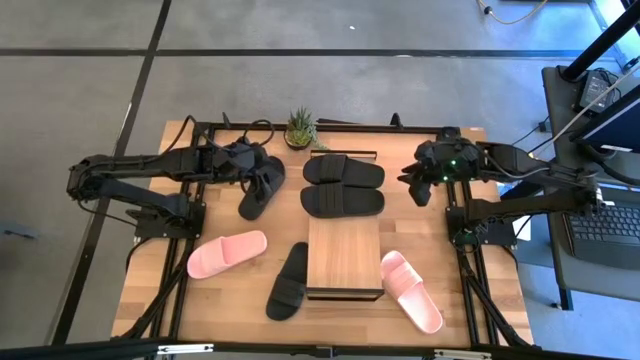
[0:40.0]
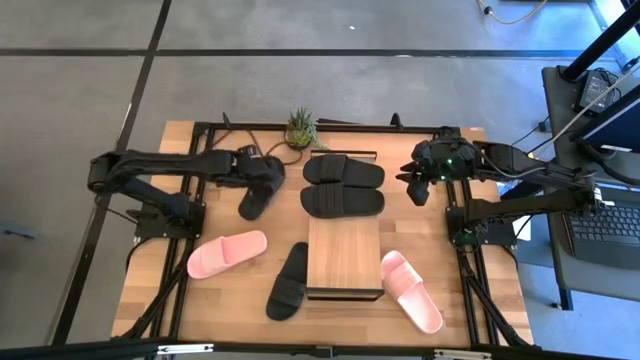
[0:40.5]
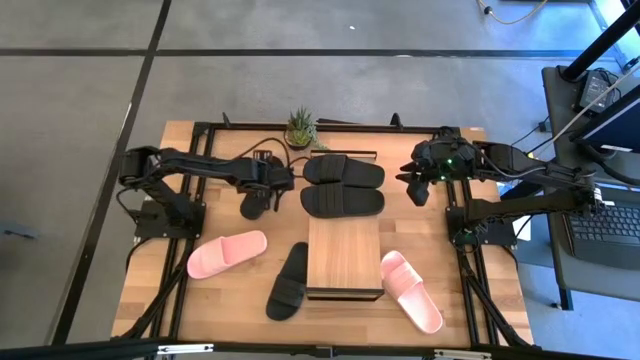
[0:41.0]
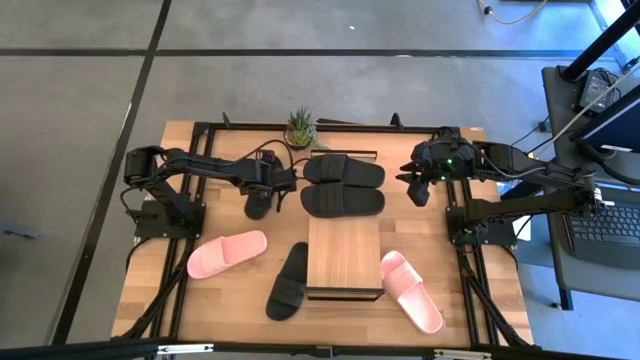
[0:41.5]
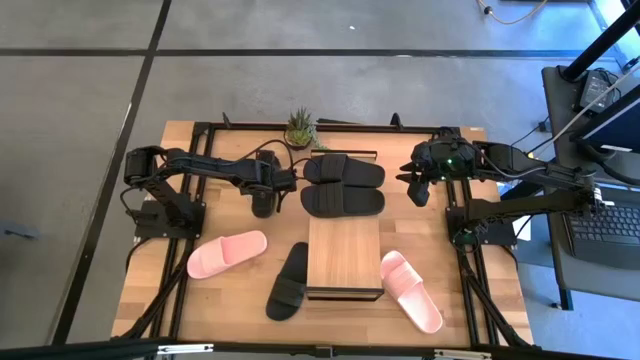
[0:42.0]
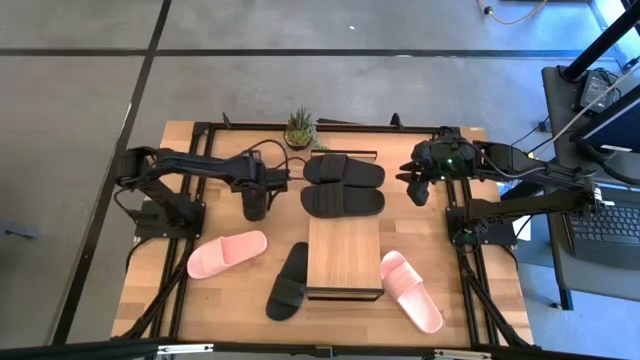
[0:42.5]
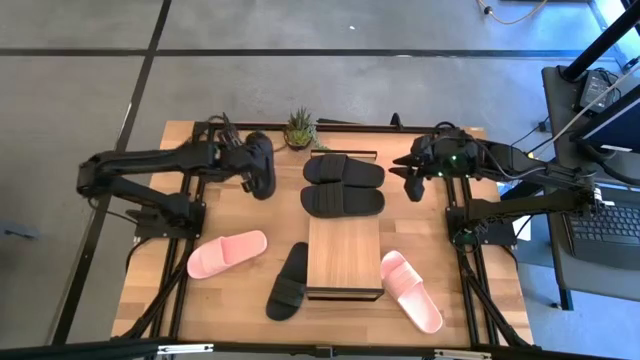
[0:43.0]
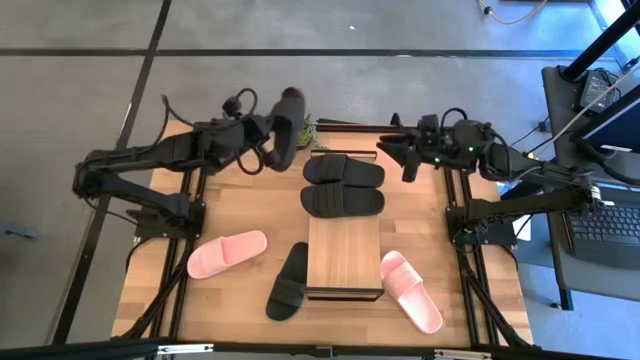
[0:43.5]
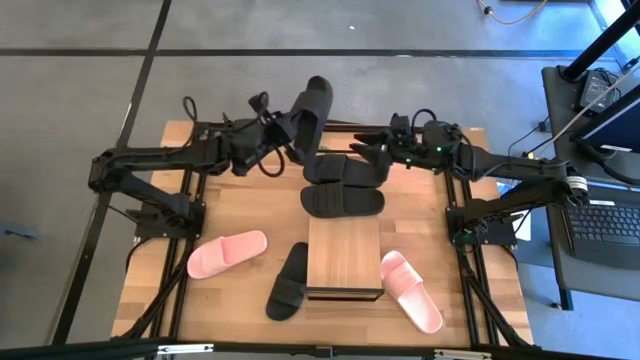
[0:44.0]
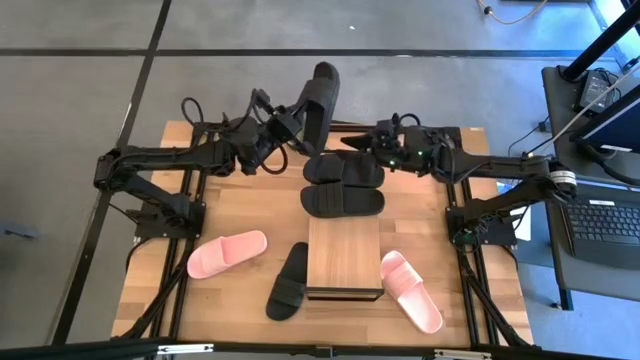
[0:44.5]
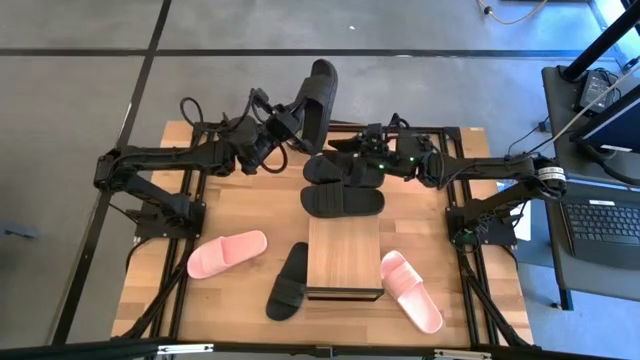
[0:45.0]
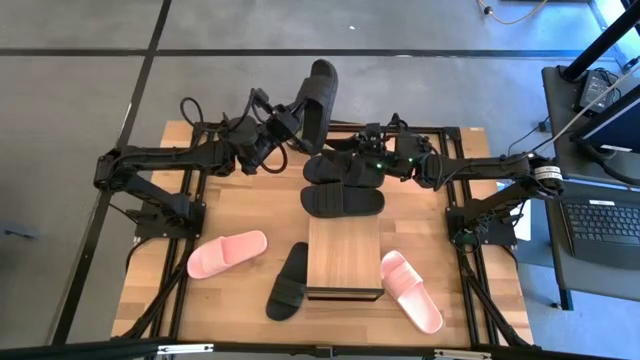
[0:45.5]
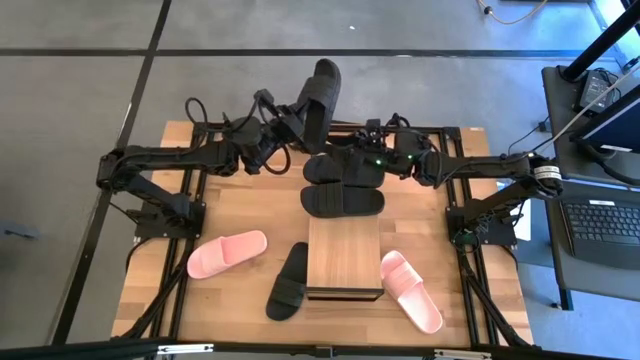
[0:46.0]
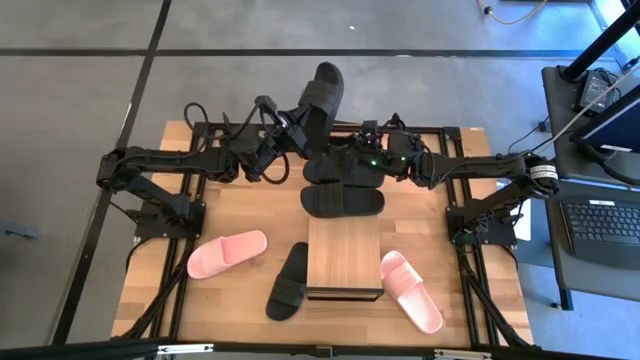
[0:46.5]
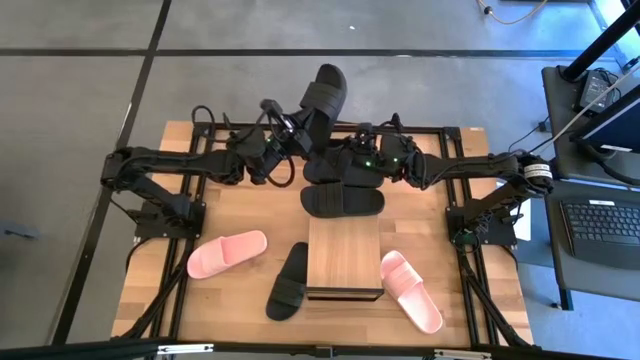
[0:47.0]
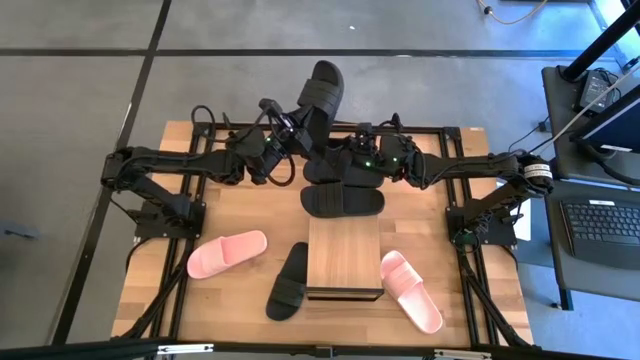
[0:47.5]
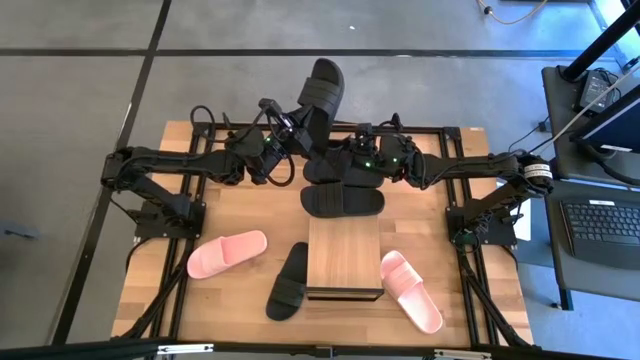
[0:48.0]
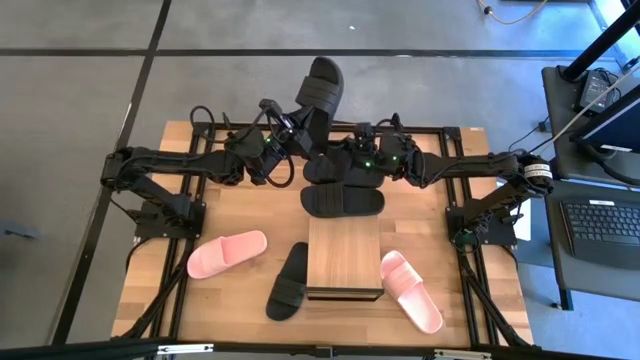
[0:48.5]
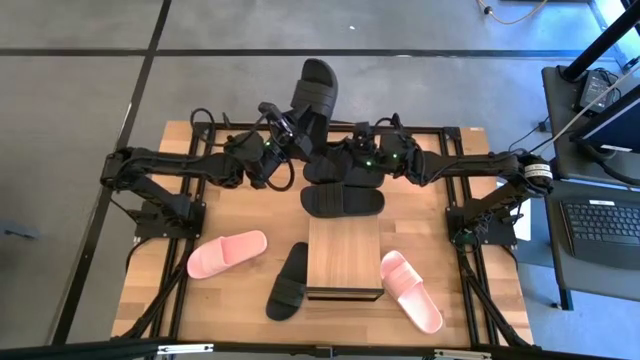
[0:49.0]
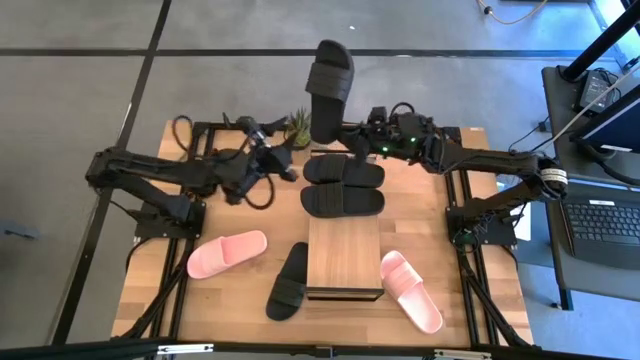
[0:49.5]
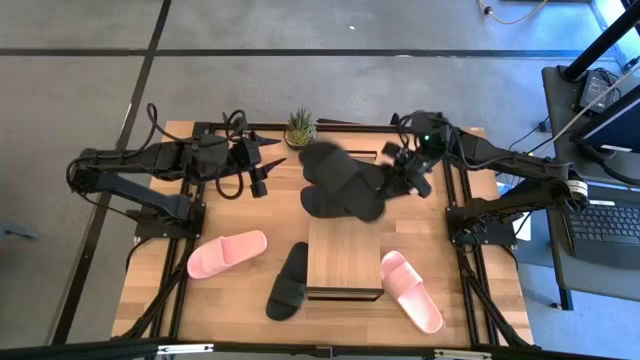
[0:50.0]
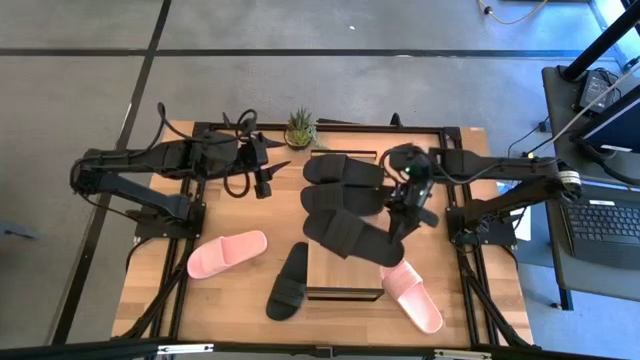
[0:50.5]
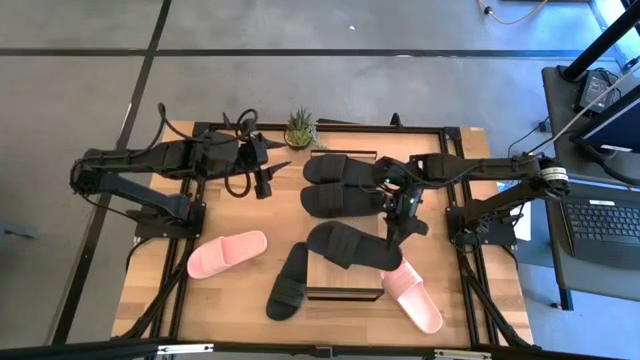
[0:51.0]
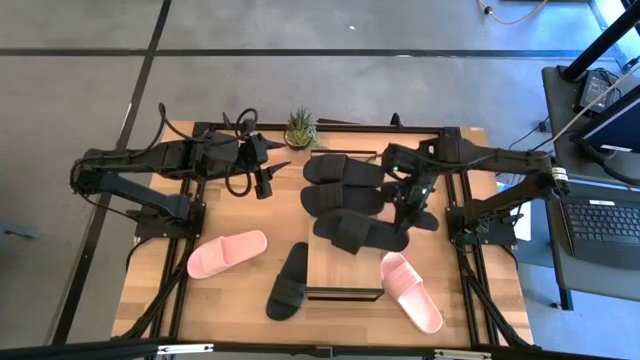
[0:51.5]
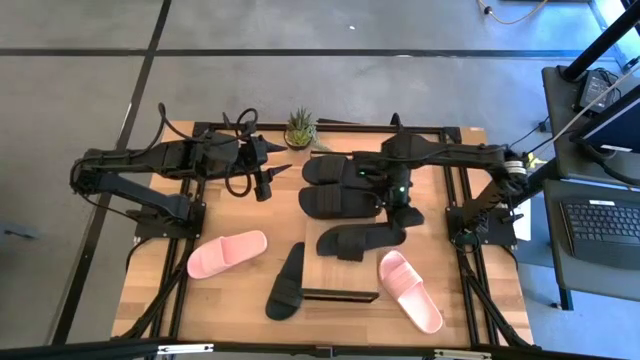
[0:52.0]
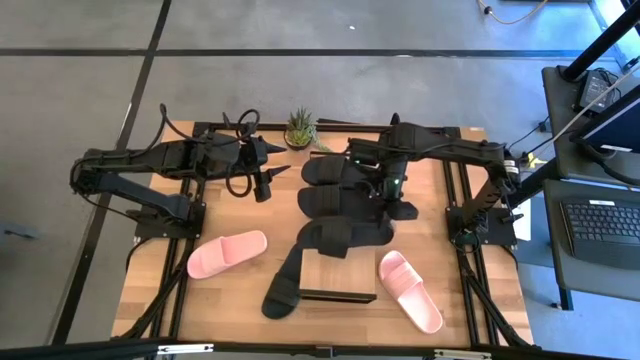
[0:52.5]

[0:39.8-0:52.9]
Task: Pick and place slides into the shelf
Put the black slipper on the shelf
